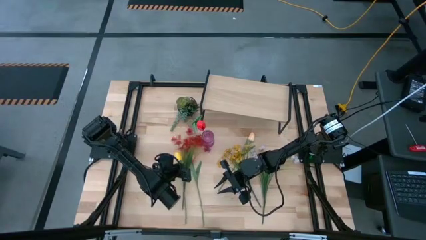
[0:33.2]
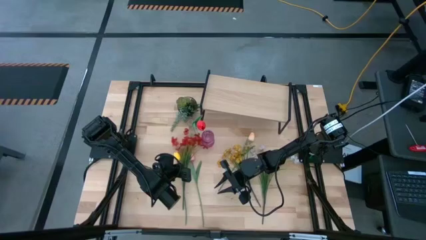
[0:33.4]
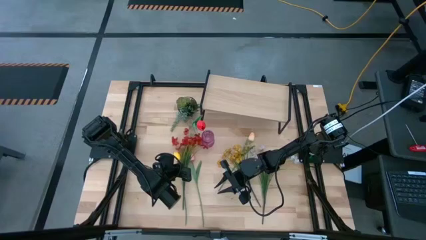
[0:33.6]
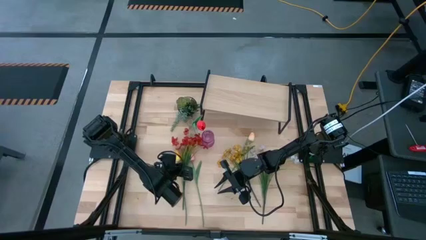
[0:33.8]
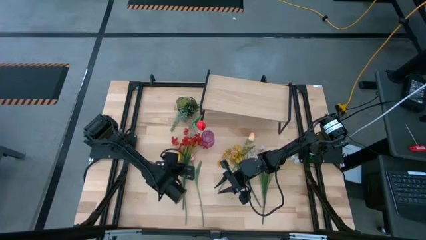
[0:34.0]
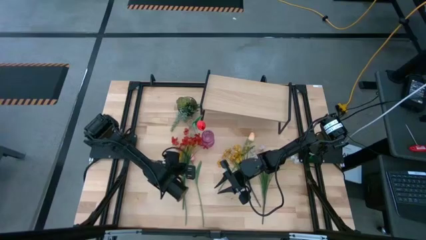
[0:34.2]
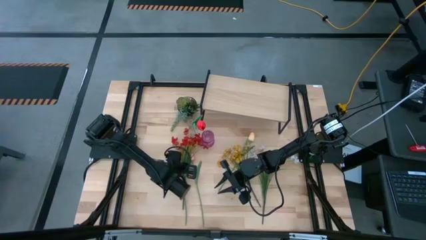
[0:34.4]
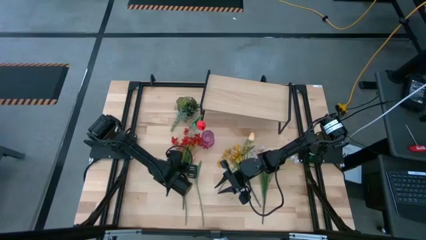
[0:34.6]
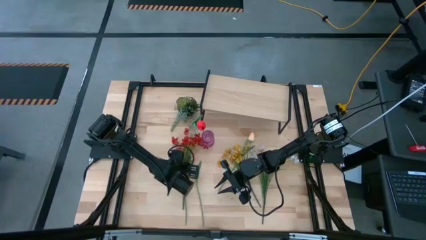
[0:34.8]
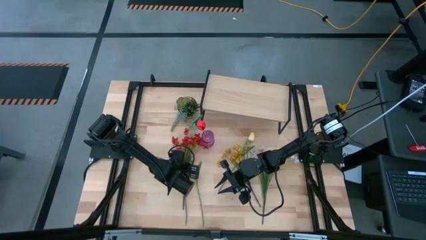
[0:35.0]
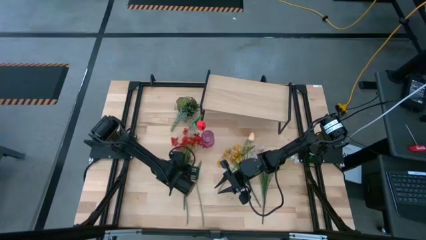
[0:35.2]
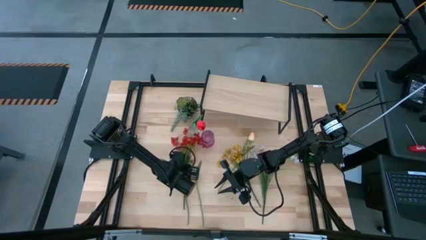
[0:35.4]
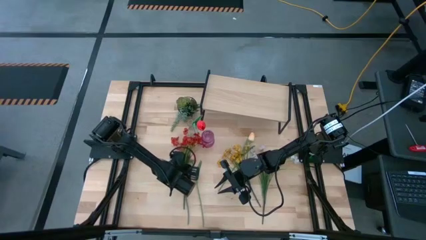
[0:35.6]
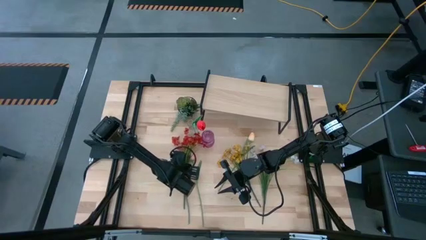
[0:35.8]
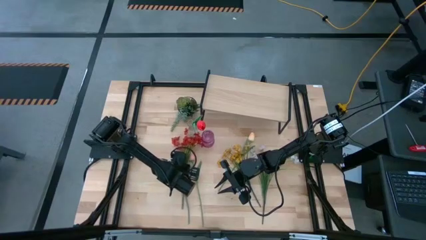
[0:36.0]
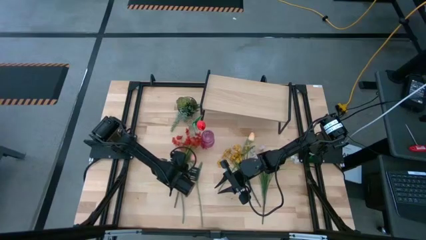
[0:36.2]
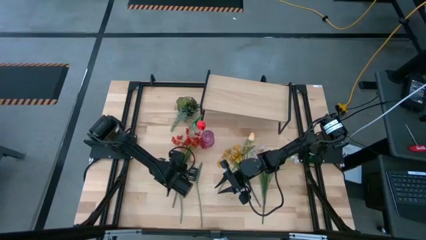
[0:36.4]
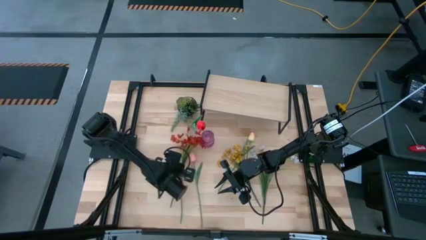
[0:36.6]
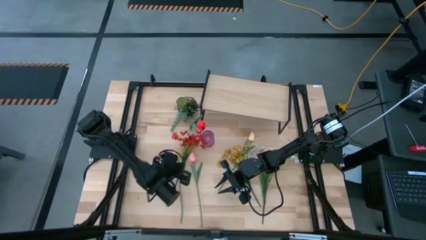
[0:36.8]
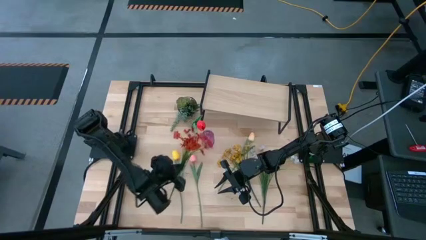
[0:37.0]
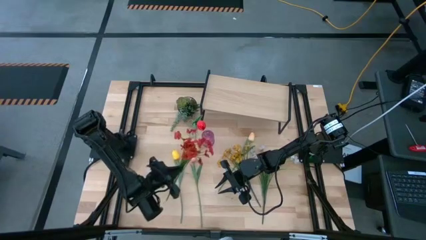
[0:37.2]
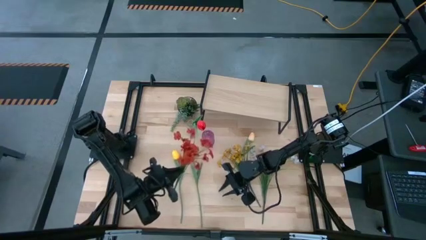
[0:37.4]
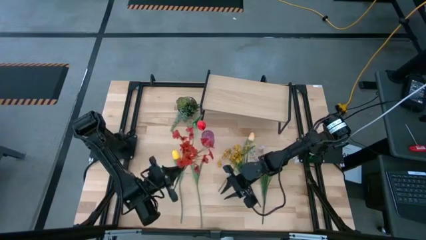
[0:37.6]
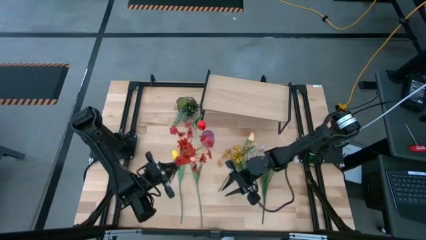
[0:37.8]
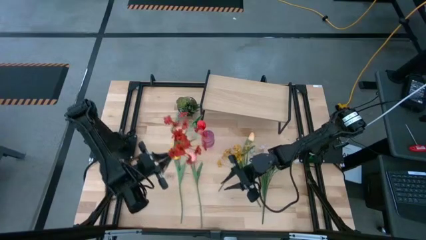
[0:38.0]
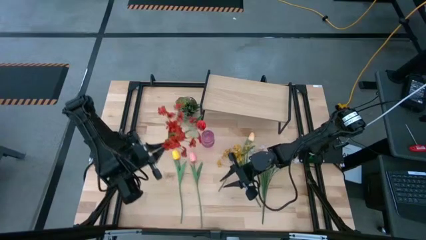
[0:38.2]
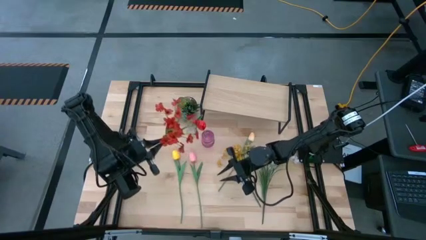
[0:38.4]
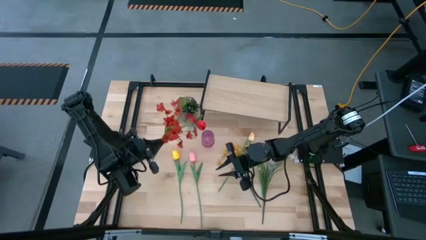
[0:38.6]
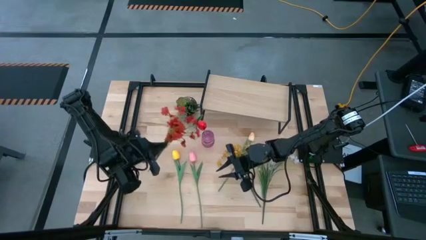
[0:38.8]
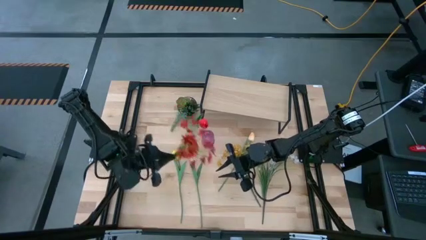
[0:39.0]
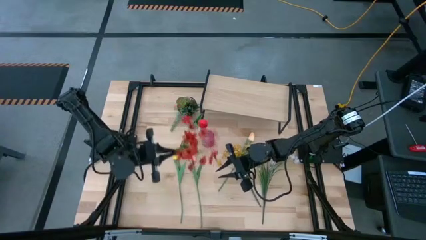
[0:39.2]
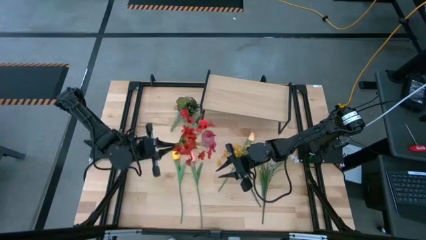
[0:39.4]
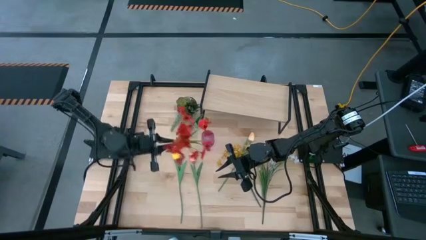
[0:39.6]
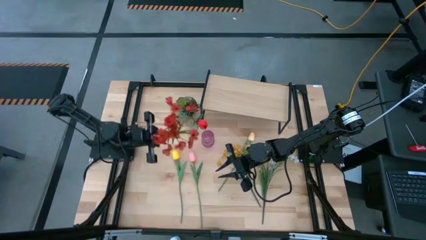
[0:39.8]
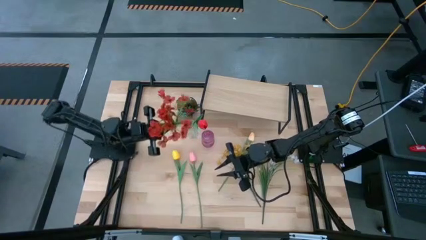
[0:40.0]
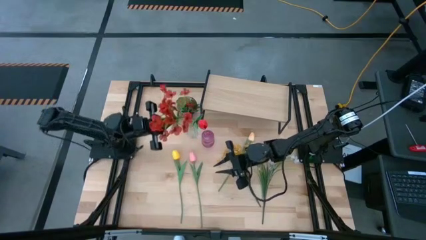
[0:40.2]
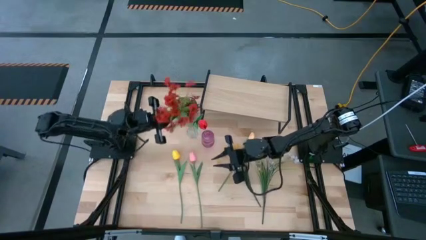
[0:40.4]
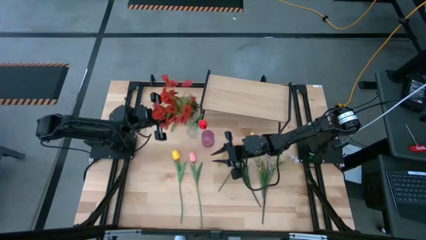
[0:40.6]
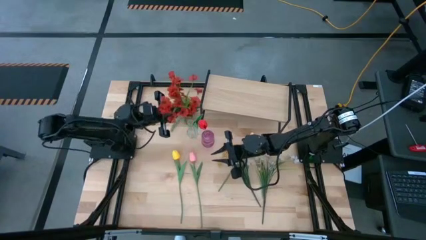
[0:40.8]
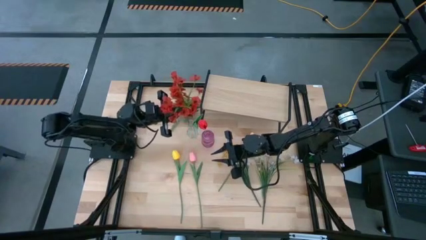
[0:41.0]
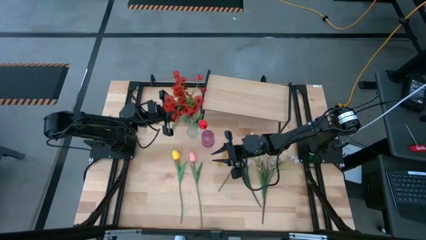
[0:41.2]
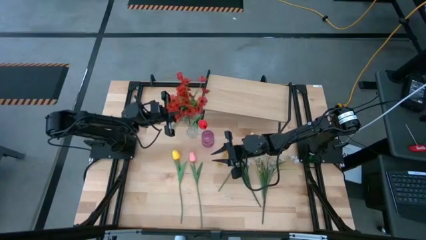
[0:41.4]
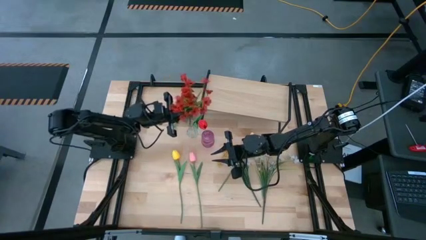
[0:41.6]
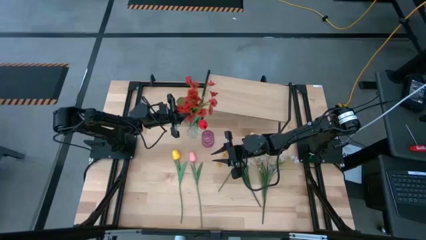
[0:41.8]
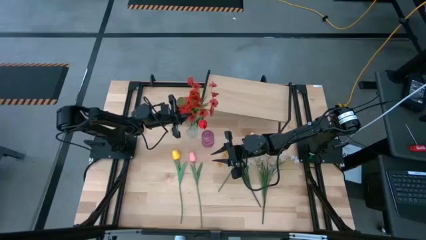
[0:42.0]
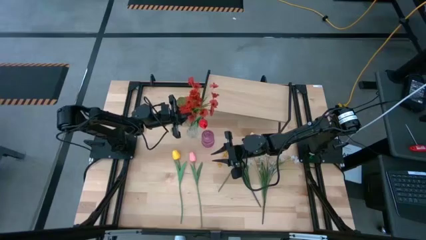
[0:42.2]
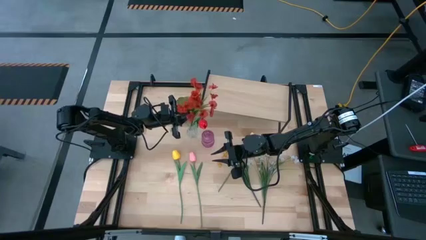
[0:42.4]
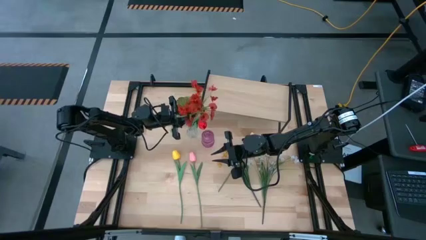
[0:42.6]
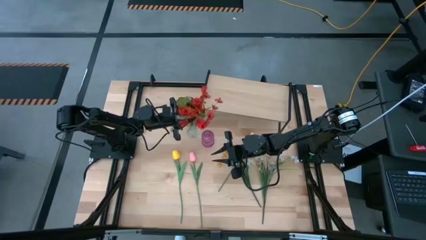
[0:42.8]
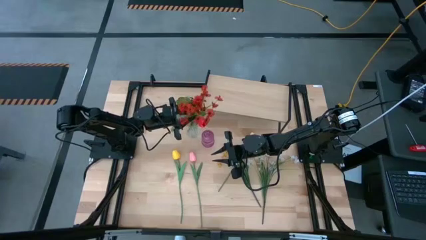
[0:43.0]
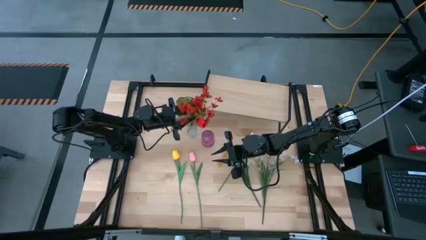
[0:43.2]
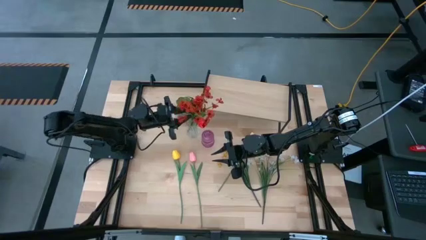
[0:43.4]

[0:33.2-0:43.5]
Task: Pick and place flowers into a vace then onto a shelf
Put the red flowers into the transparent vase
